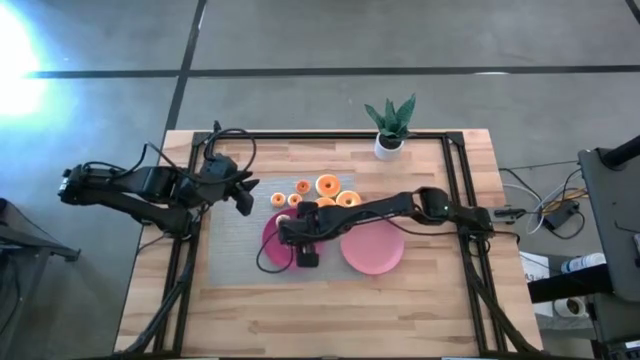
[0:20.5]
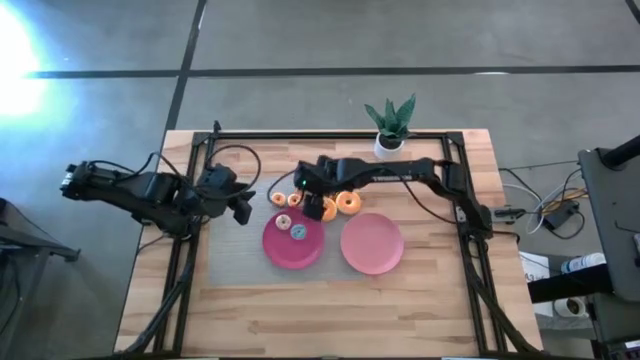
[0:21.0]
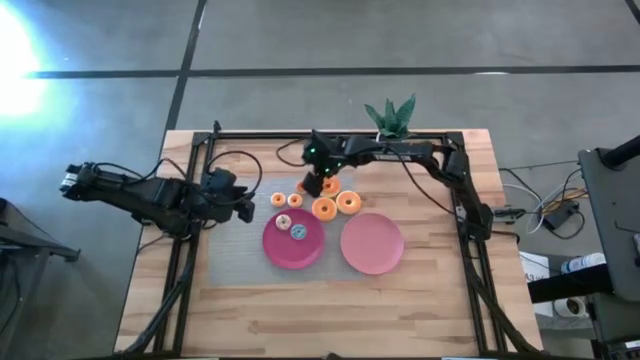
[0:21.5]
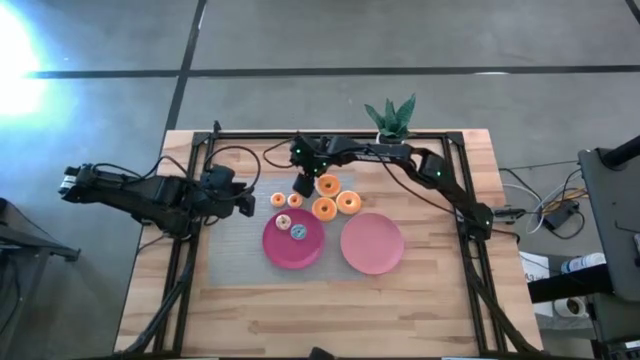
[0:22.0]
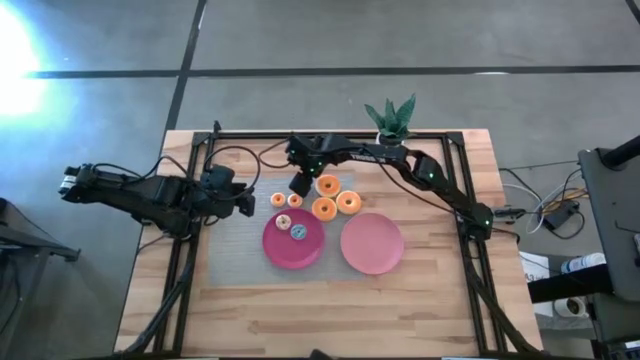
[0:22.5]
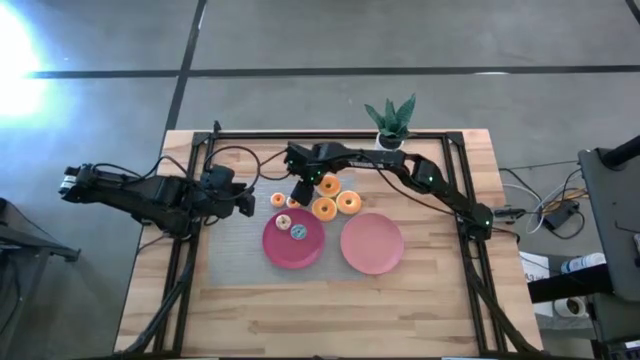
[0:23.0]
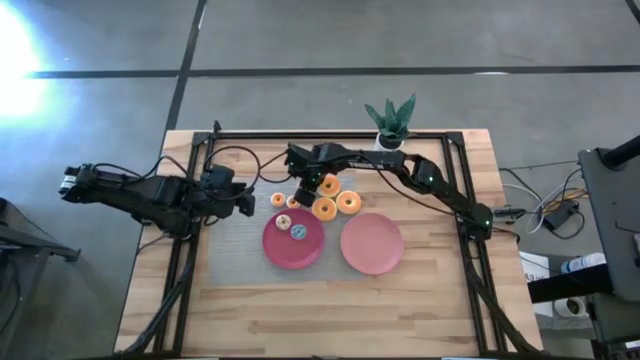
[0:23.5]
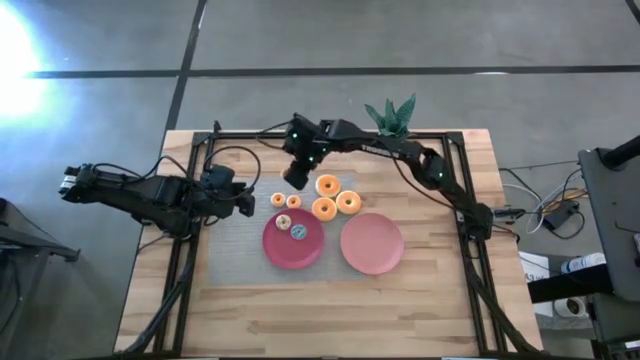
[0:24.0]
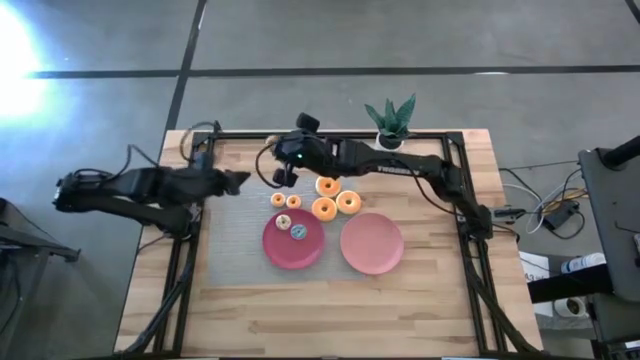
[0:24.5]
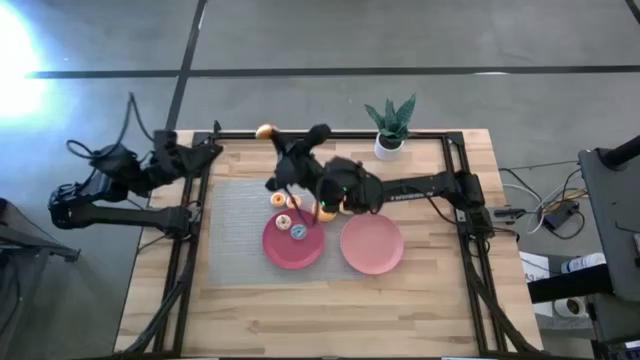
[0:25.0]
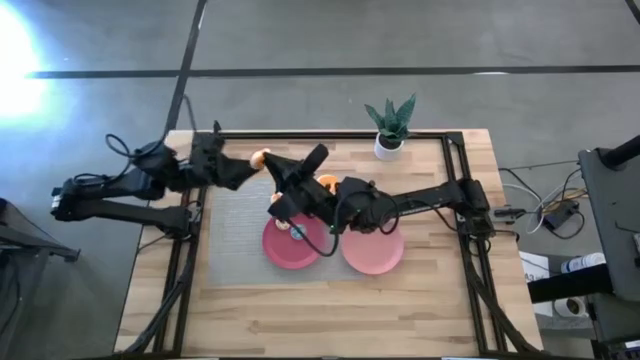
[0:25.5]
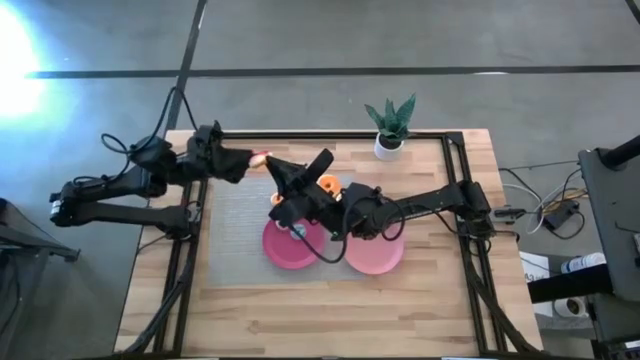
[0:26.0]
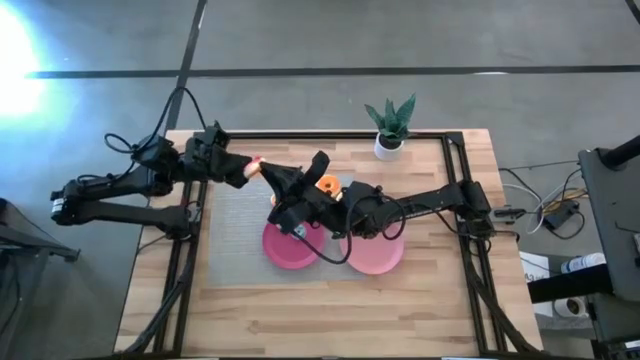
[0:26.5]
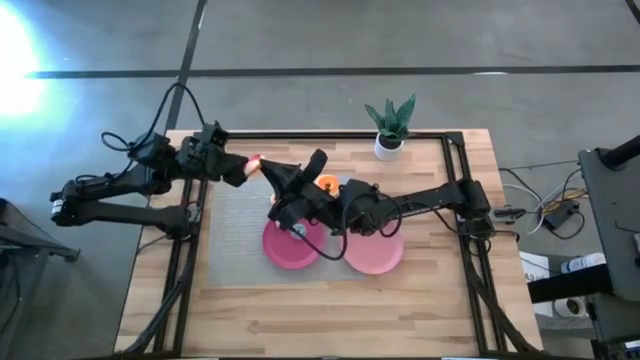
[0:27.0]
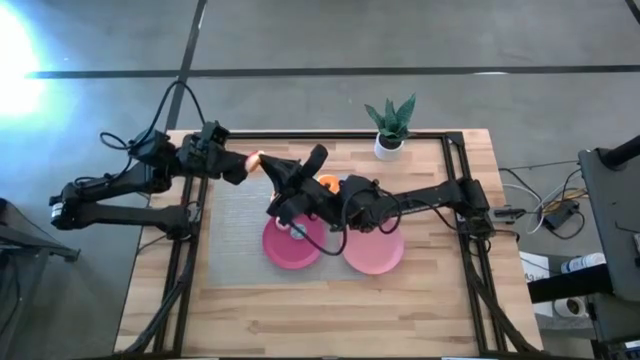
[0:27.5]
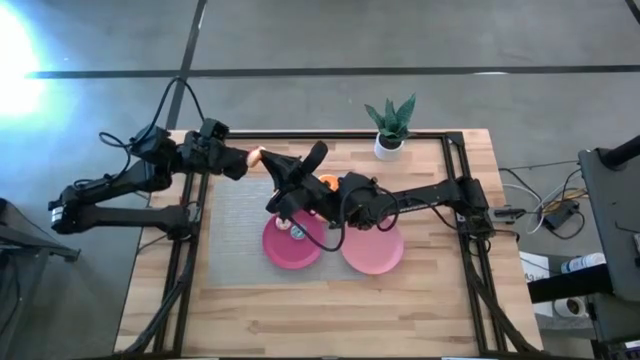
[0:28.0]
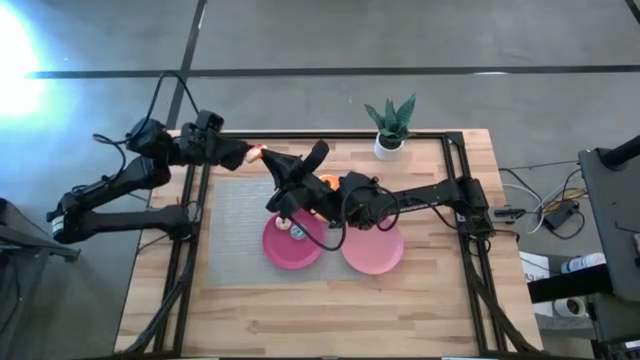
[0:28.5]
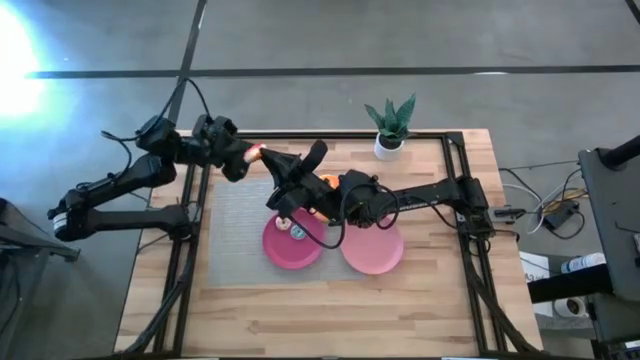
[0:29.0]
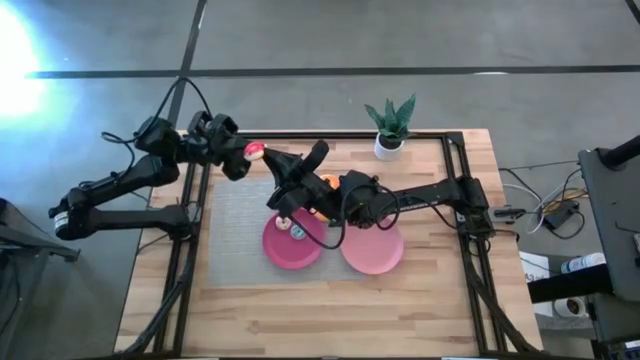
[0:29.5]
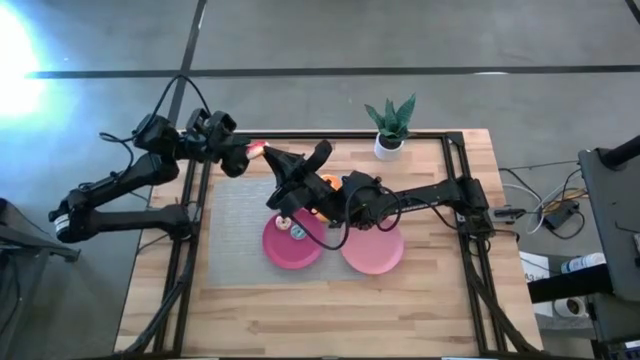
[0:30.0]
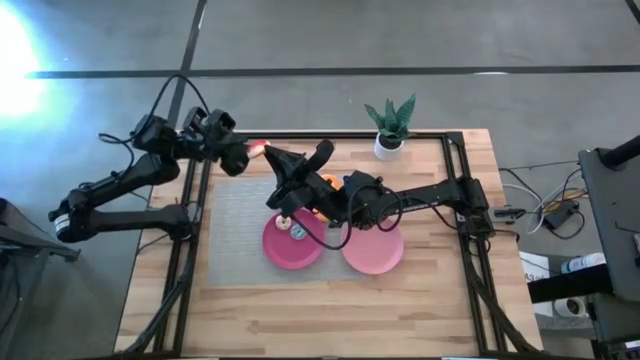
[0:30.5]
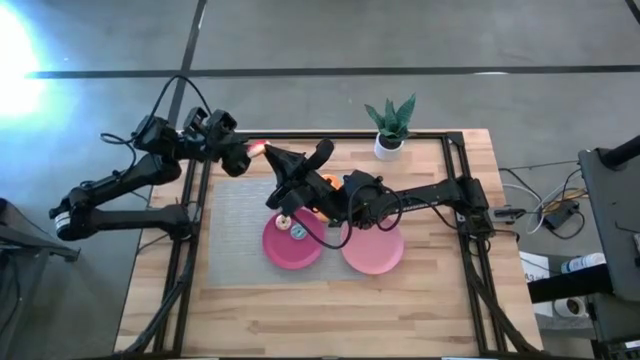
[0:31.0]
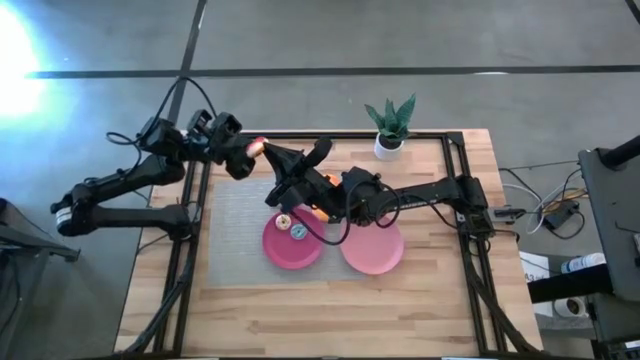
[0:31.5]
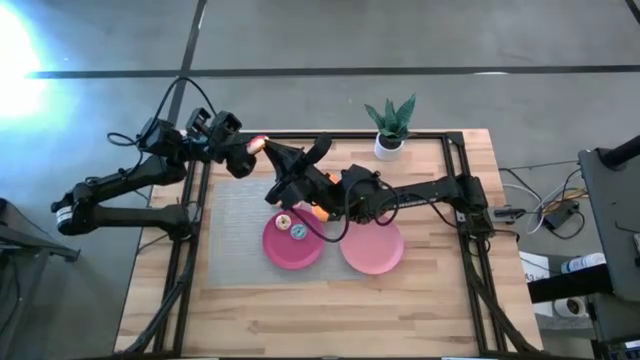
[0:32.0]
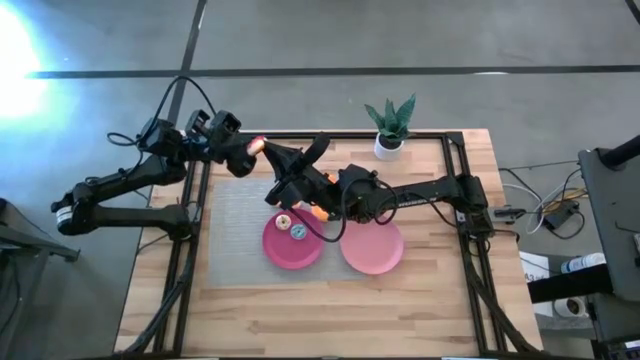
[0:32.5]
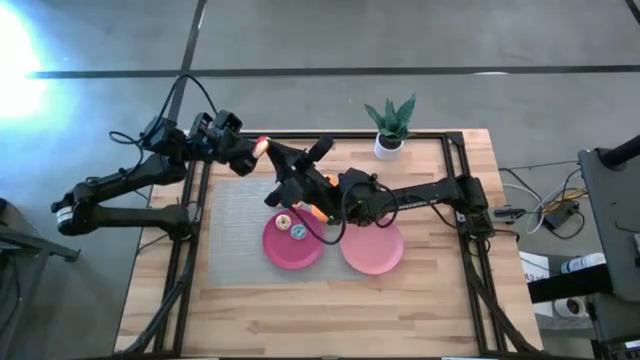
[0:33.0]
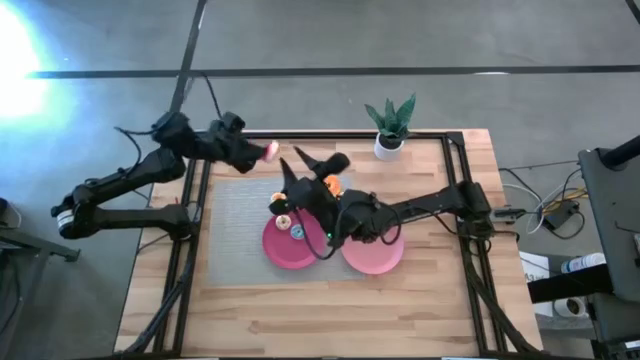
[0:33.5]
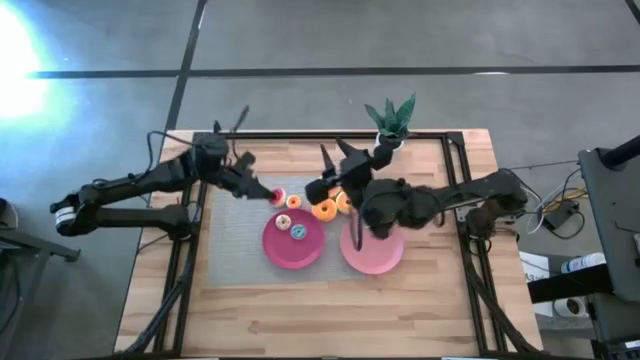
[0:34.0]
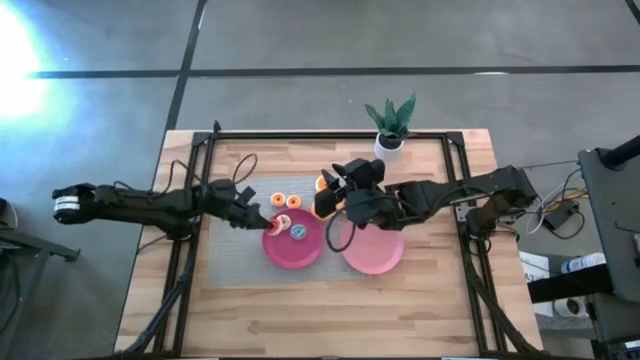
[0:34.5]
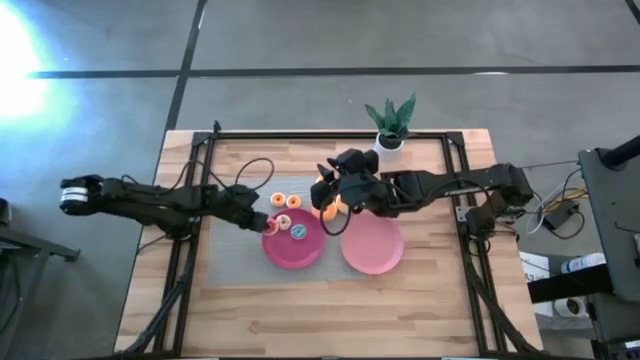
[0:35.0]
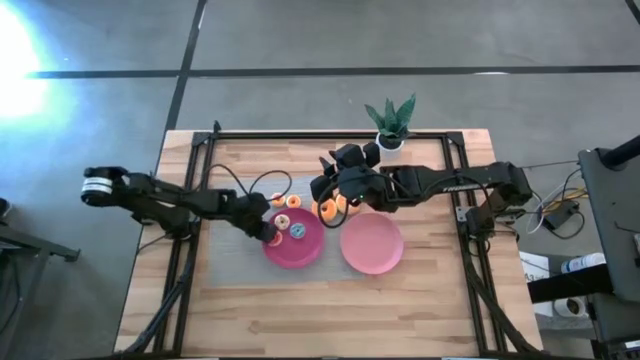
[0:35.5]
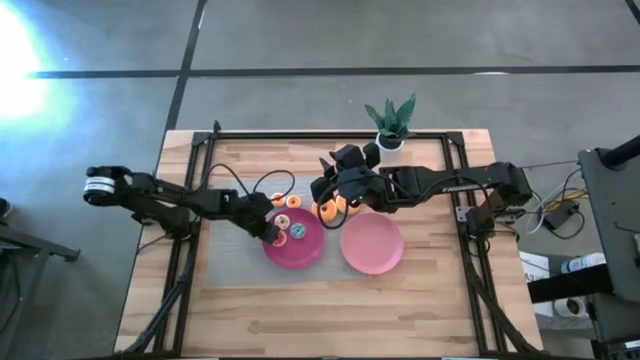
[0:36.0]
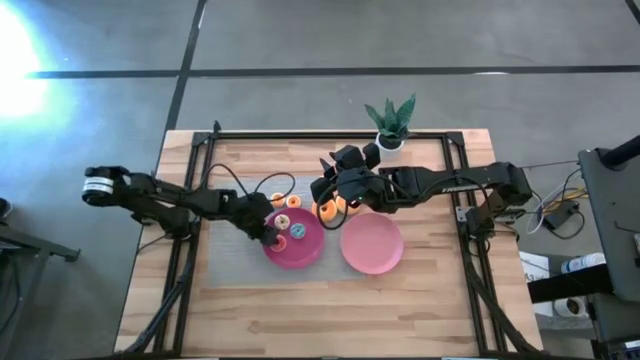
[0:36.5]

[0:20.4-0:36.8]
Task: Pick & Place donuts
Put the small orange donut on the dark pink plate

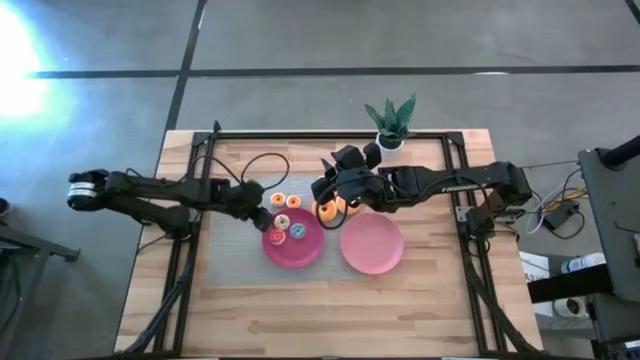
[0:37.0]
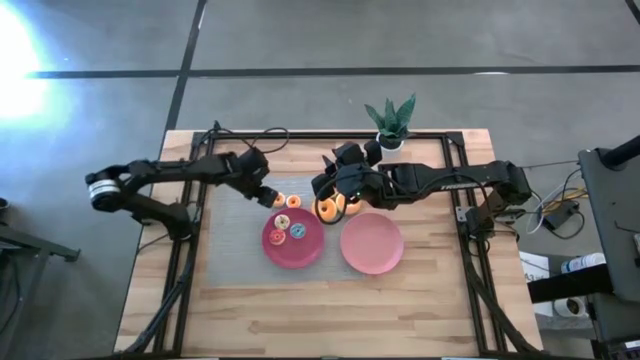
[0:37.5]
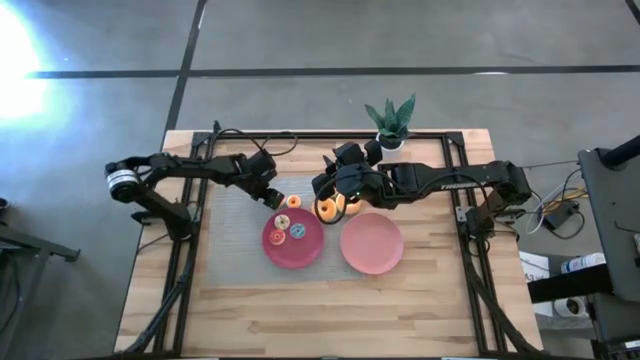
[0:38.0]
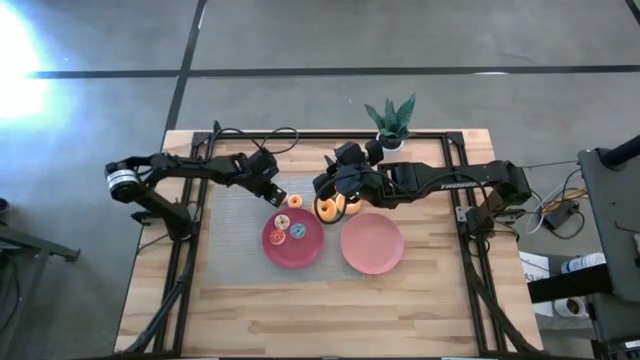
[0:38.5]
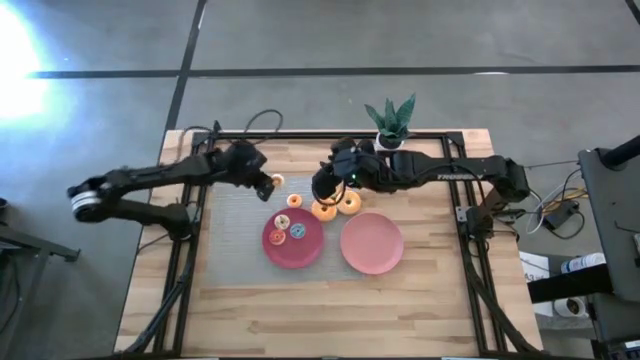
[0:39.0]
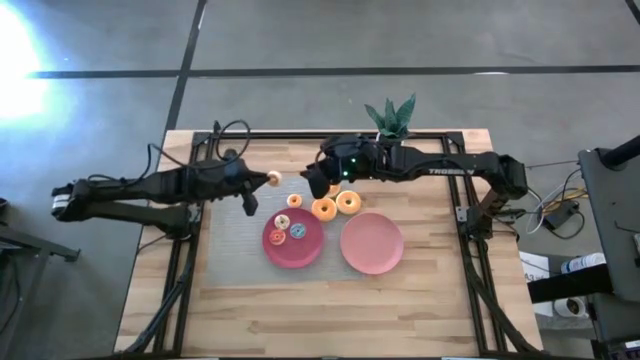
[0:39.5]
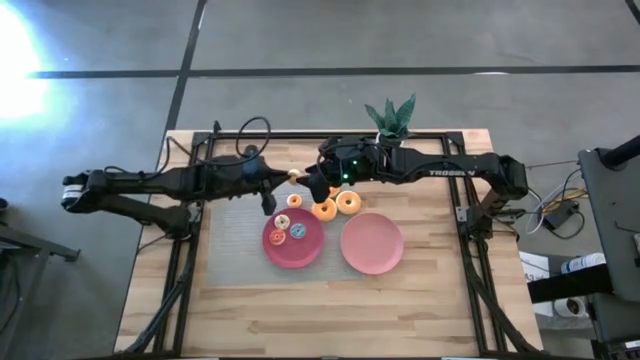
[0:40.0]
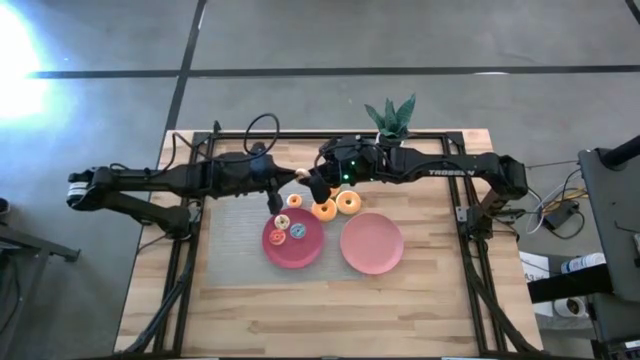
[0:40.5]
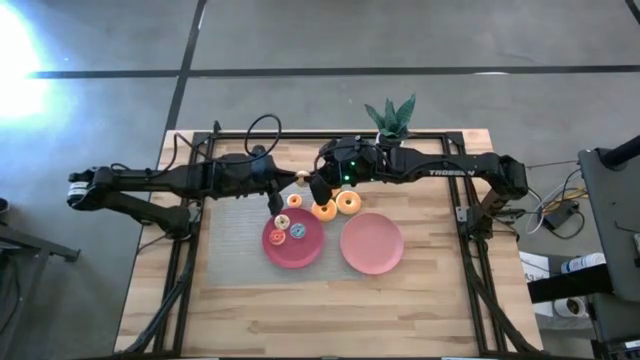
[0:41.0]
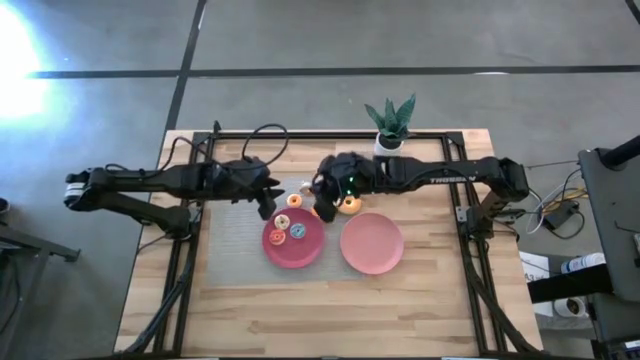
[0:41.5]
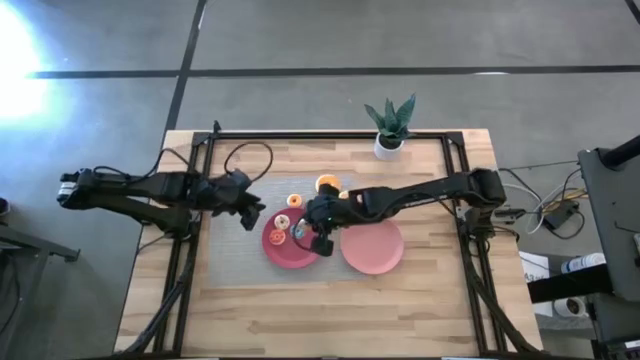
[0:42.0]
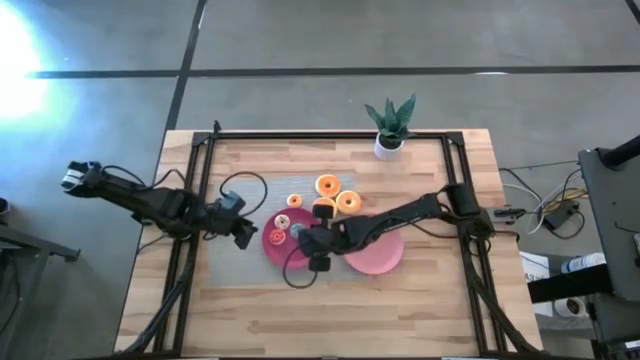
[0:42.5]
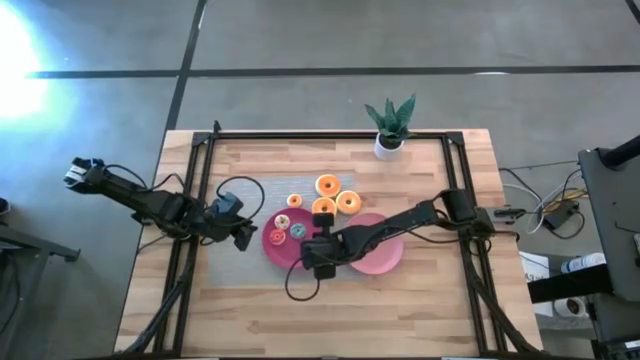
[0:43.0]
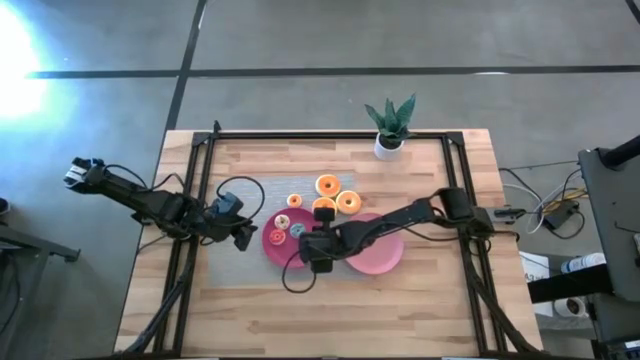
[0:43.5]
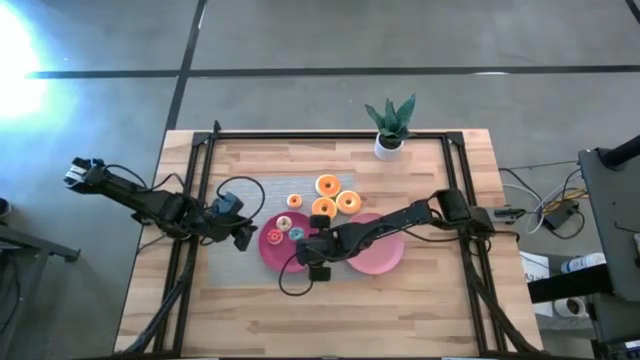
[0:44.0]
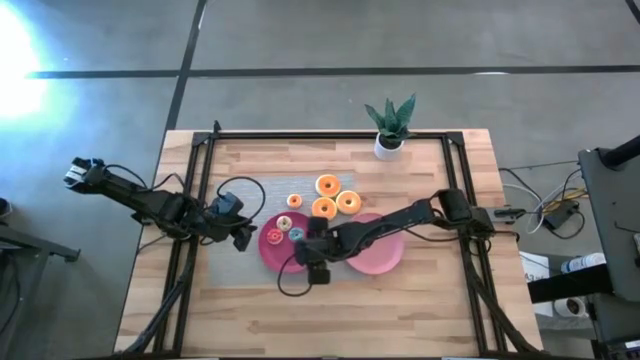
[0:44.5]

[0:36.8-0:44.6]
Put the small yellow donut on the dark pink plate
